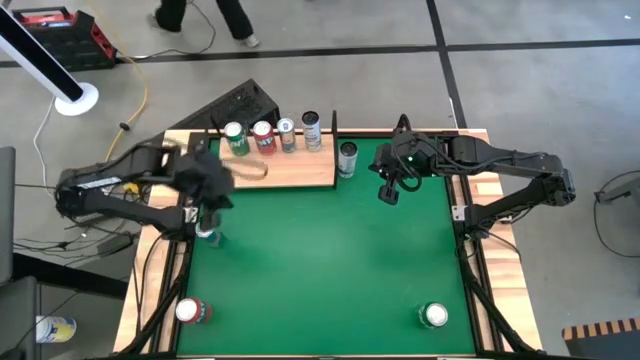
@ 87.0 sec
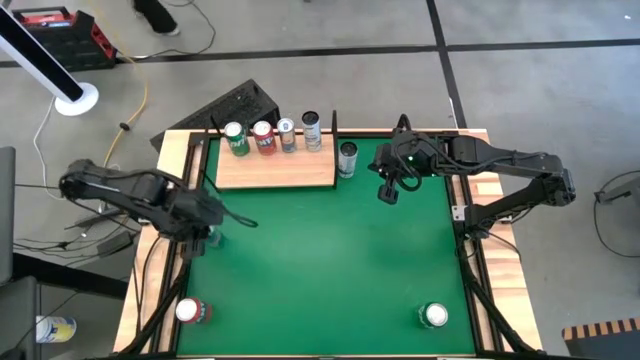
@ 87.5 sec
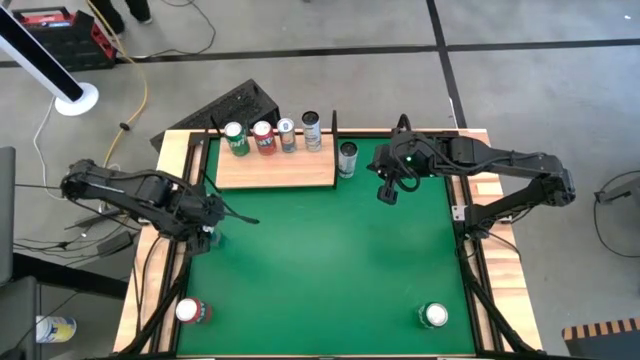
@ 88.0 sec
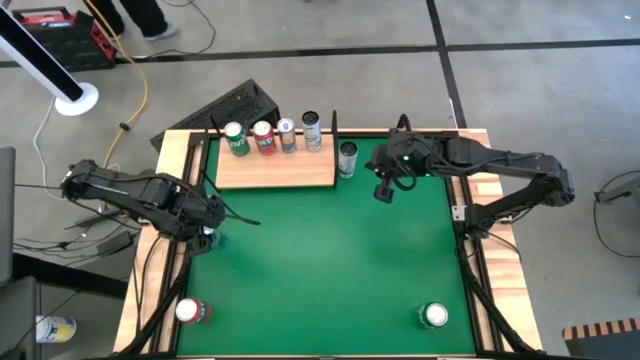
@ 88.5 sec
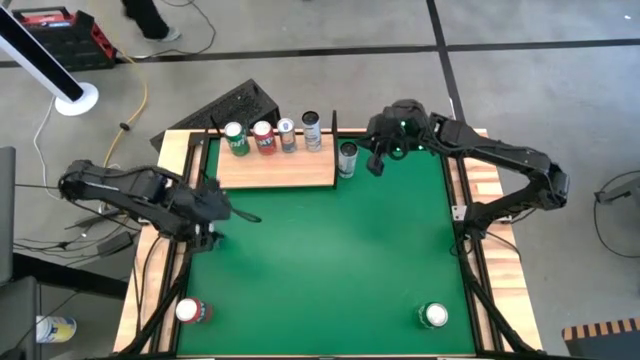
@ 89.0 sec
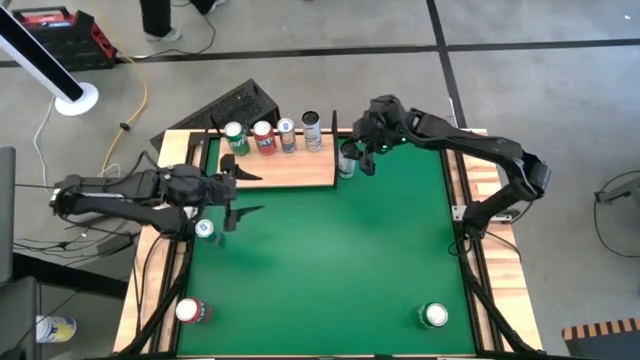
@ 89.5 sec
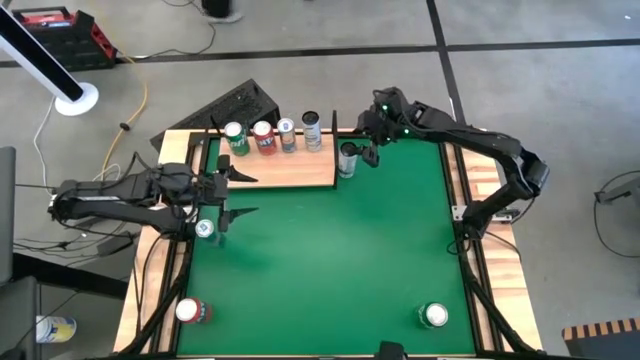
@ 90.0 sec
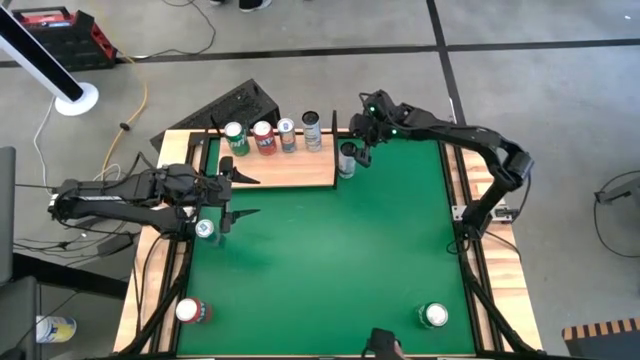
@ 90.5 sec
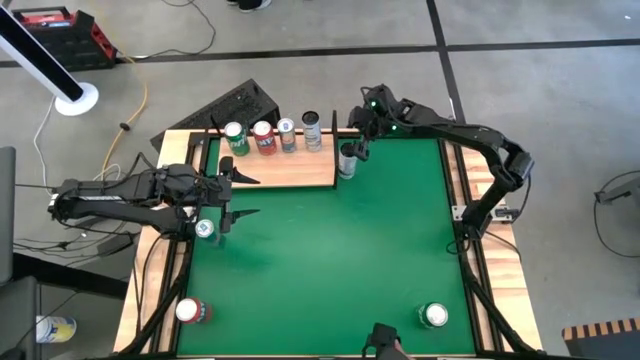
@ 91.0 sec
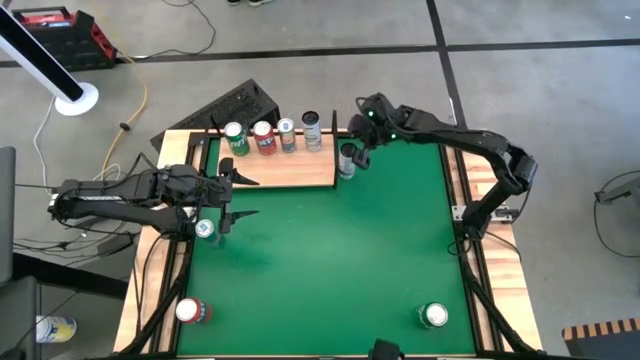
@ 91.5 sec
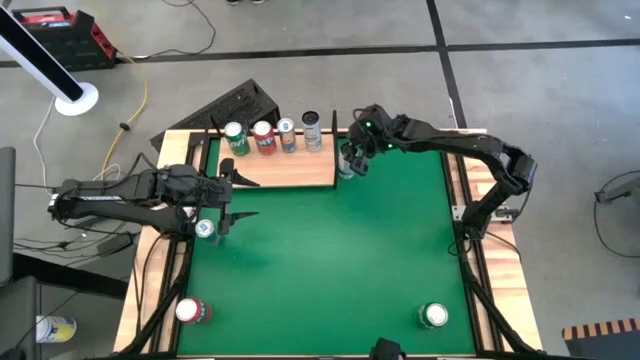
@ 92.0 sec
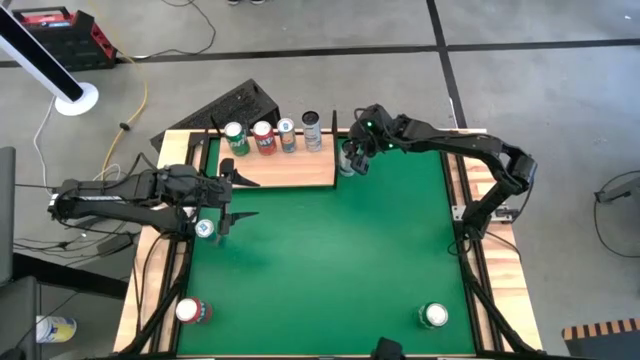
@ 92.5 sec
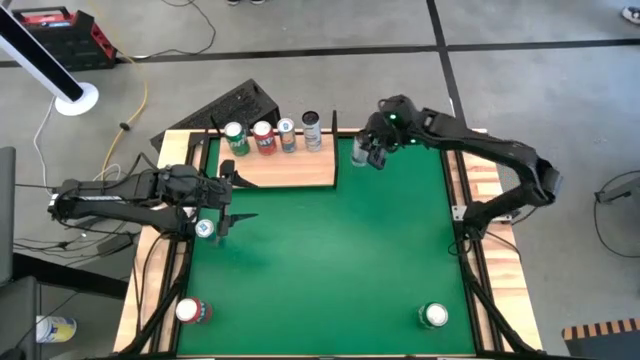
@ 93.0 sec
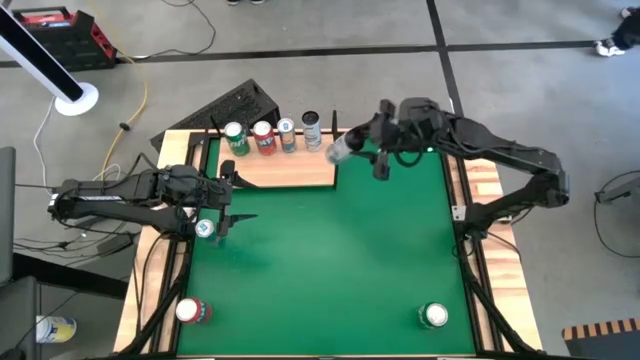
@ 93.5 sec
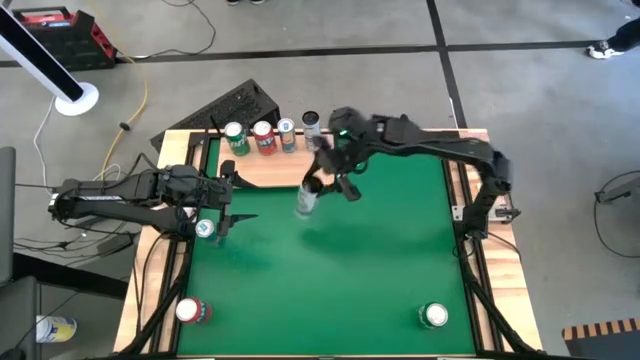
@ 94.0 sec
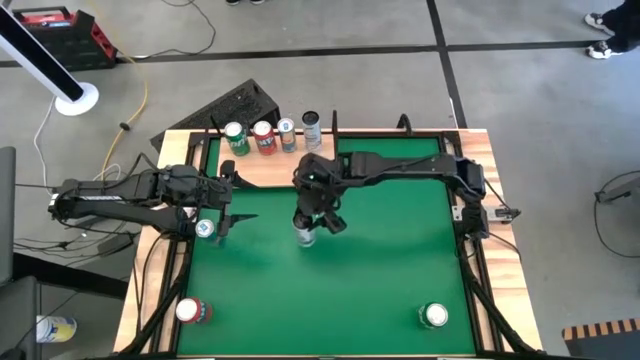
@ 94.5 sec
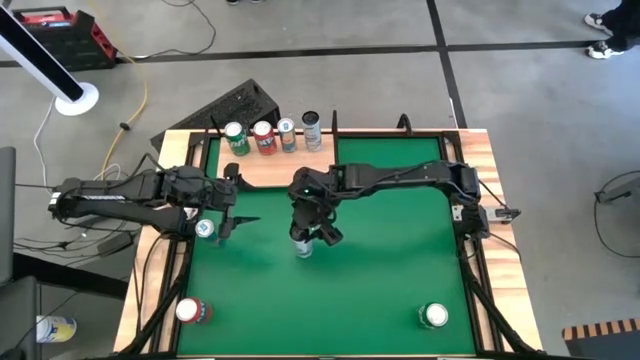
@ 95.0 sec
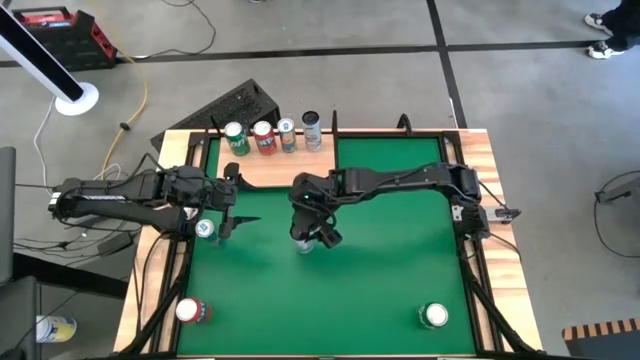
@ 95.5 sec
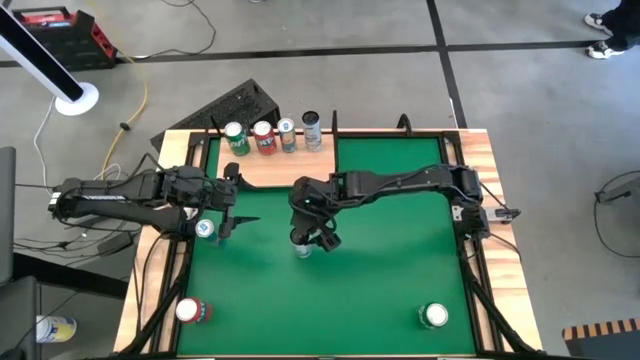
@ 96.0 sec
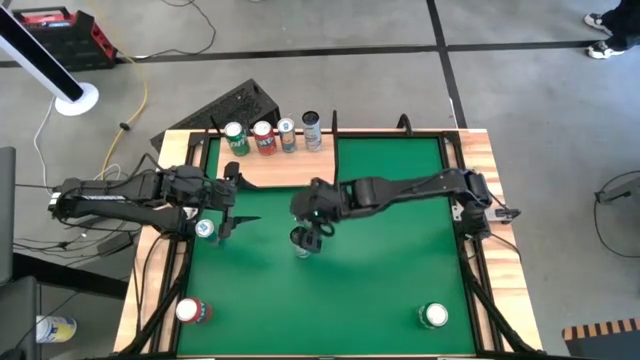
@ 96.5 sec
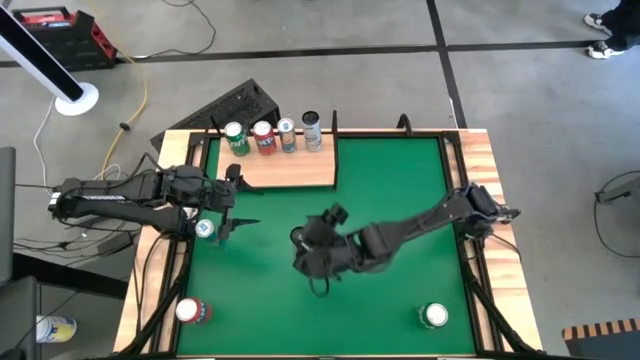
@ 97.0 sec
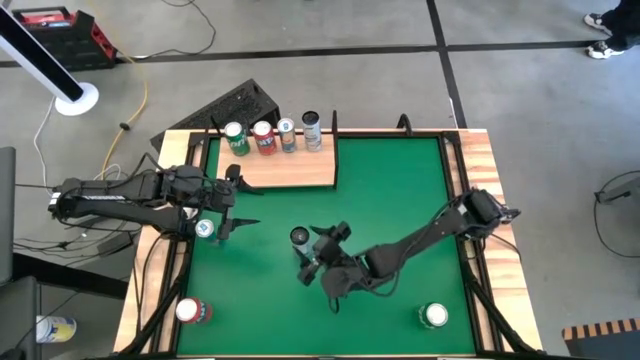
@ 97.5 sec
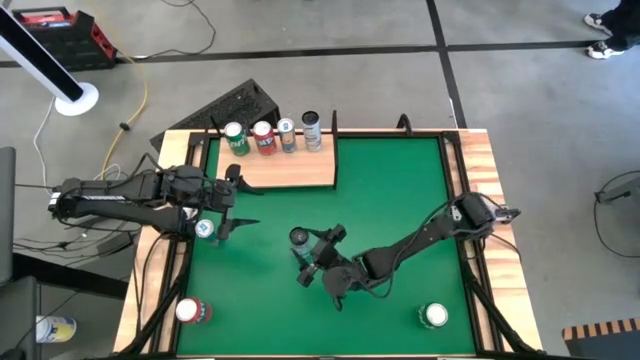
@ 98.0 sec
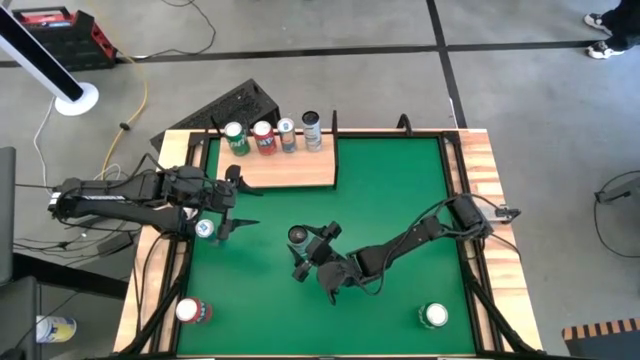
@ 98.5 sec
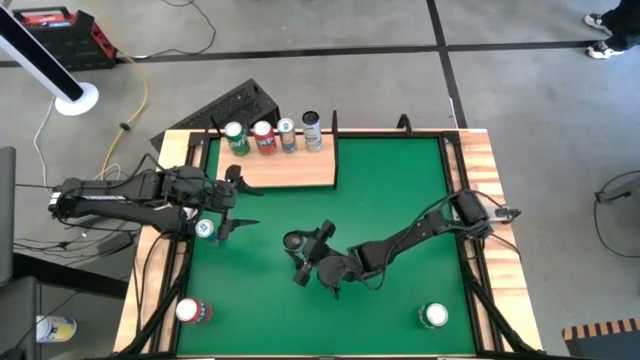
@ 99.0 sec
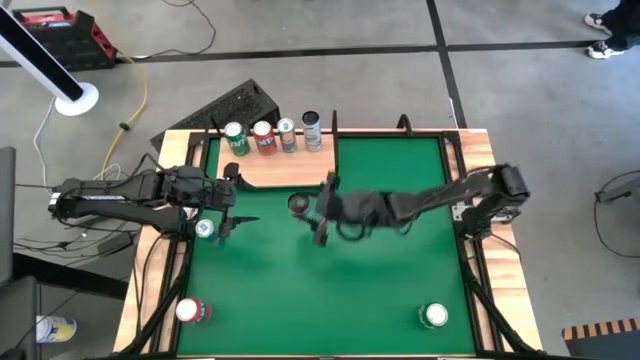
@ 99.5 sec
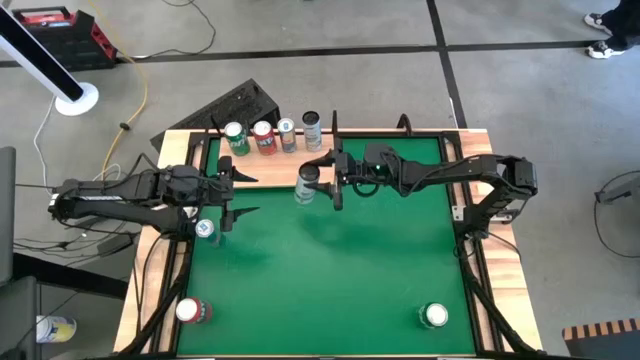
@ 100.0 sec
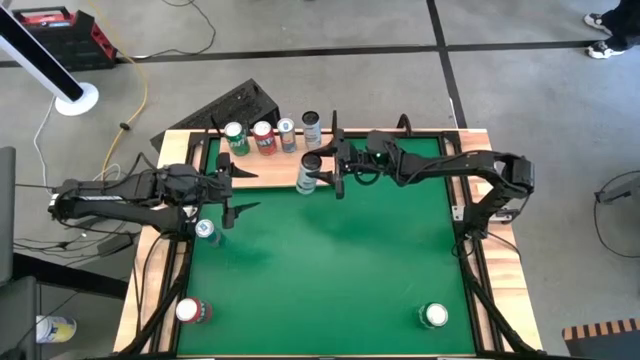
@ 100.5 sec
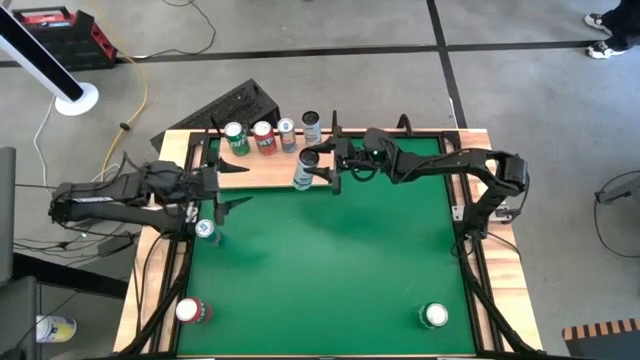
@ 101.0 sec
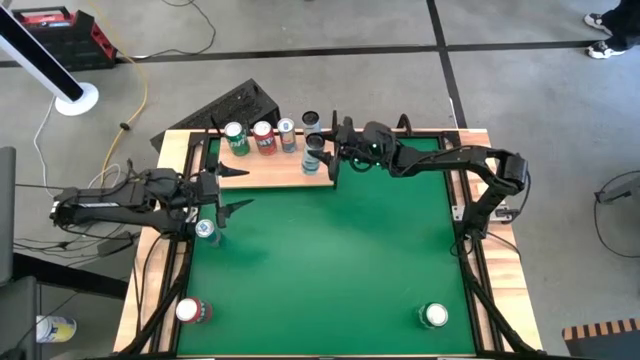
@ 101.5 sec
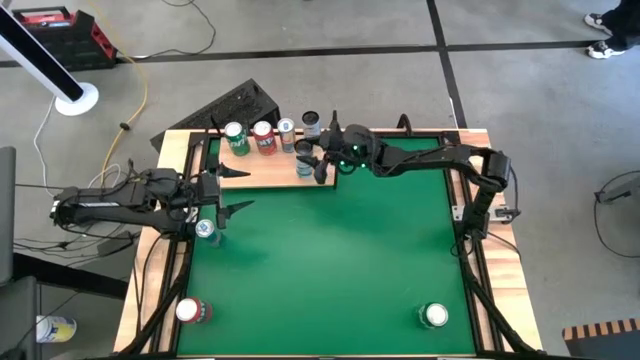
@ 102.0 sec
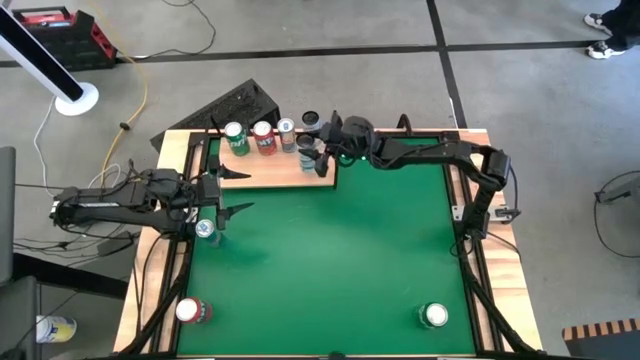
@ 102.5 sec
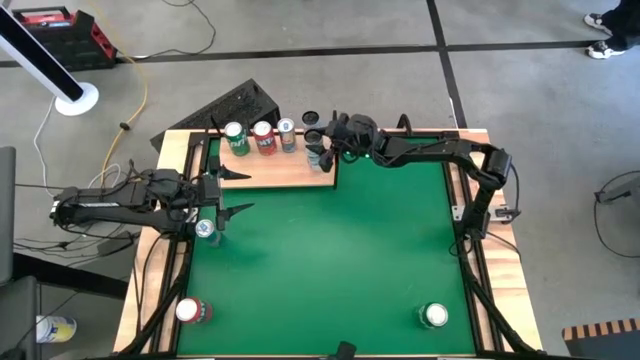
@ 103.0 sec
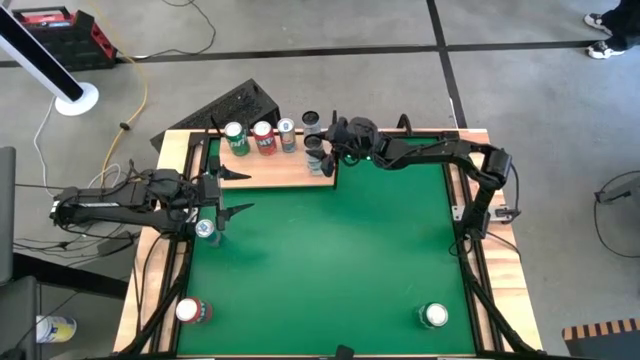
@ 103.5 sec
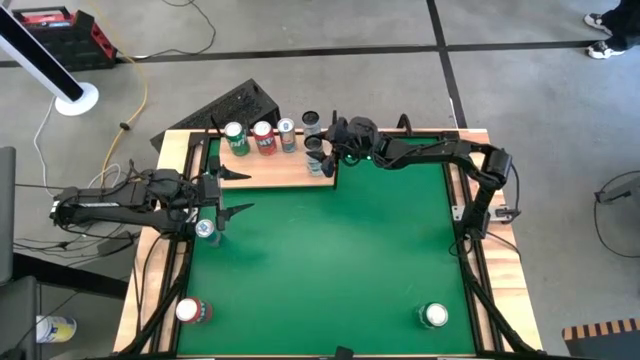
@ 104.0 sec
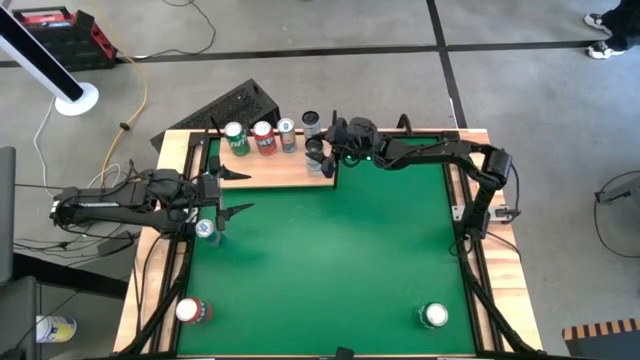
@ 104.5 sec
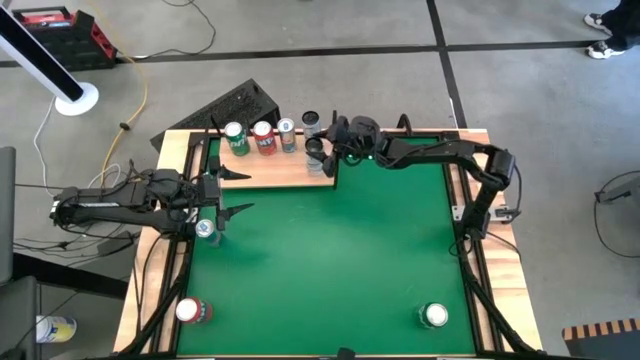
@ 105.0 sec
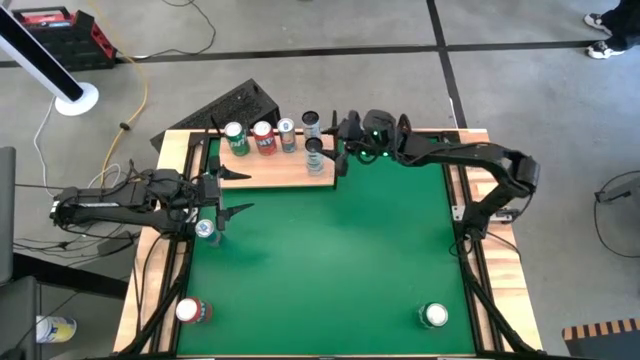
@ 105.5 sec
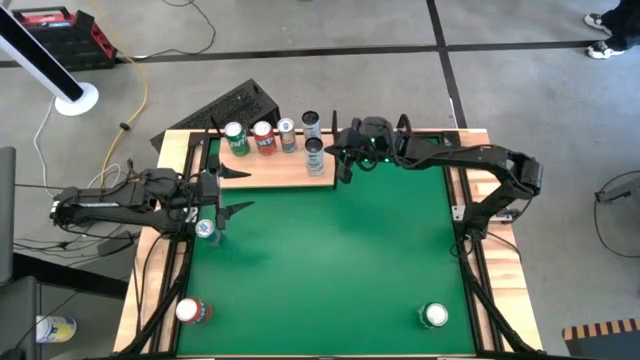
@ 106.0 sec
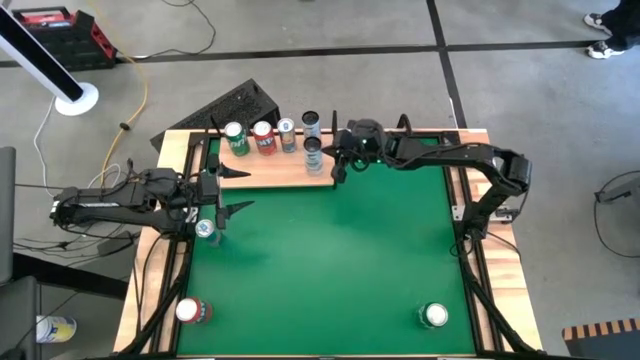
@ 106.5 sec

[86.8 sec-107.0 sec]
Task: Place canned beverage on shelf
Put the white blue soda can on the shelf aligned with the other white blue soda can

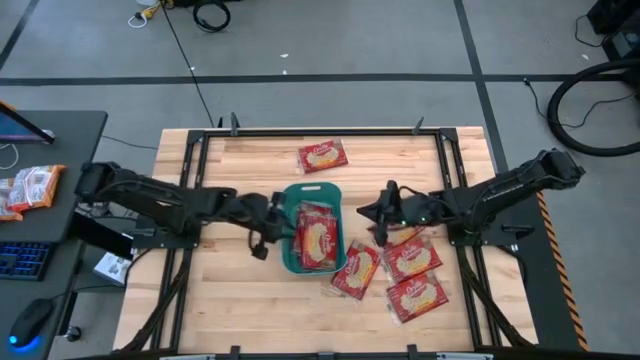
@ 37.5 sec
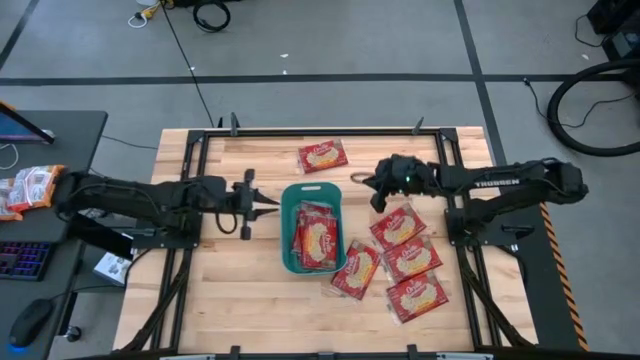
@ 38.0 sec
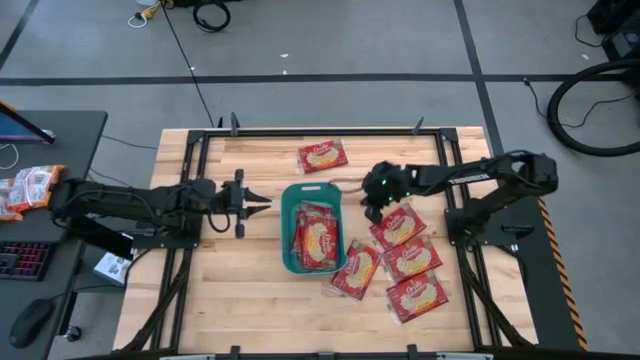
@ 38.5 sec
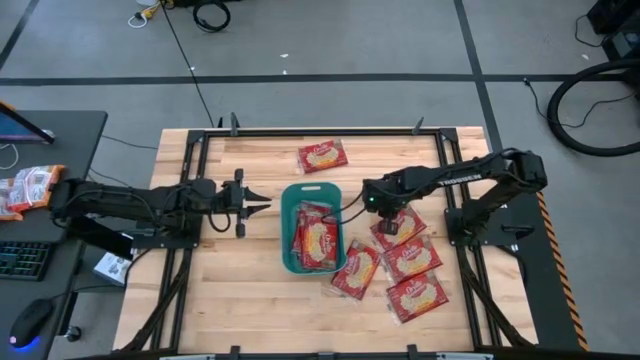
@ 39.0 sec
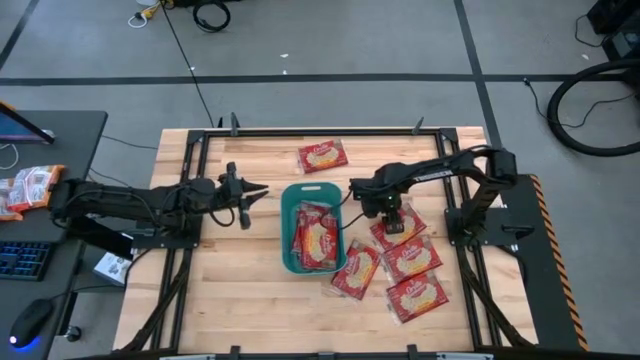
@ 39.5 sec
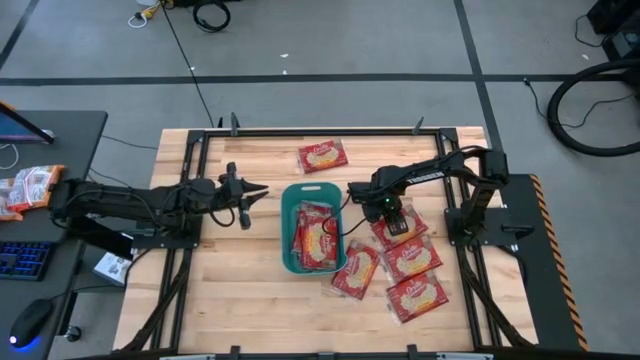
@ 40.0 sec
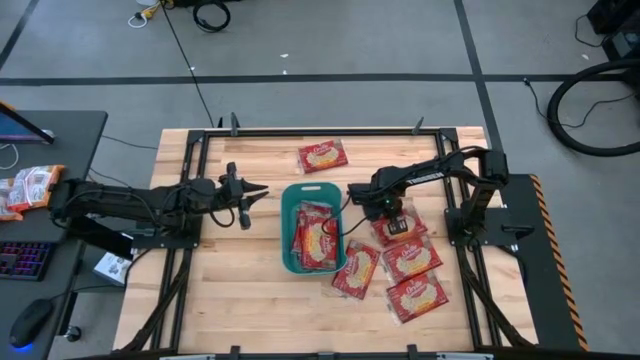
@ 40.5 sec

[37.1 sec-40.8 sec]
Task: Sort popcorn bags into baskets
Put the red popcorn bag into the green bin
